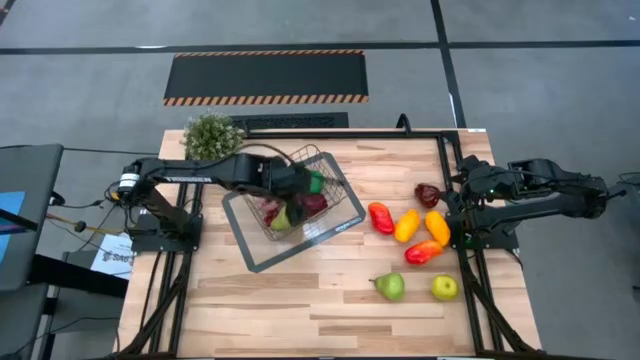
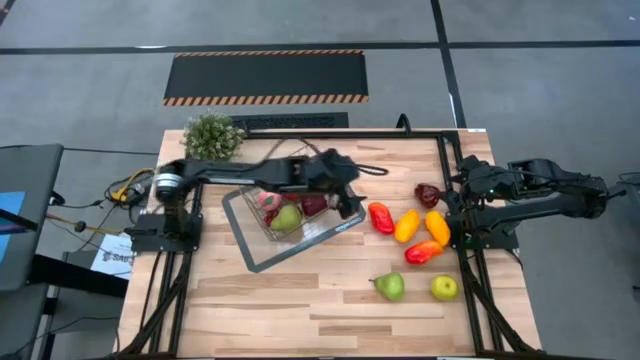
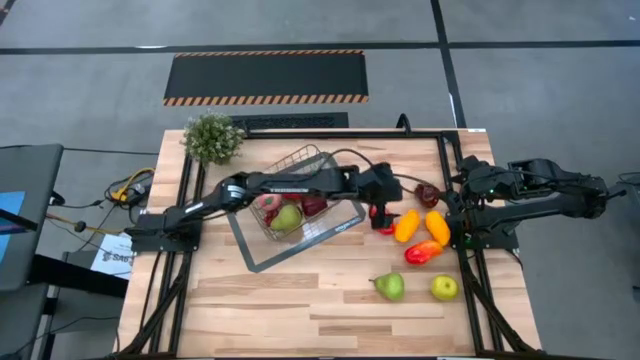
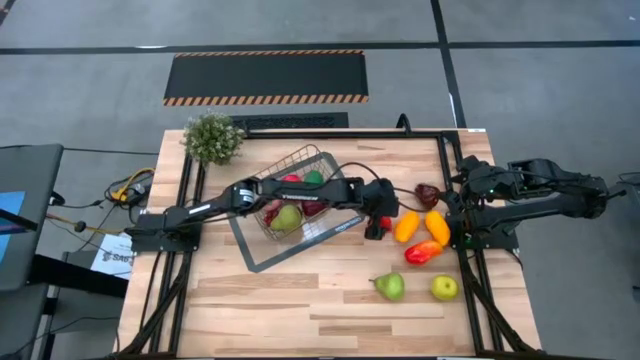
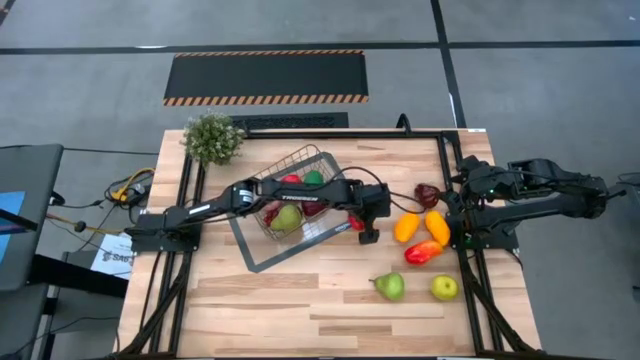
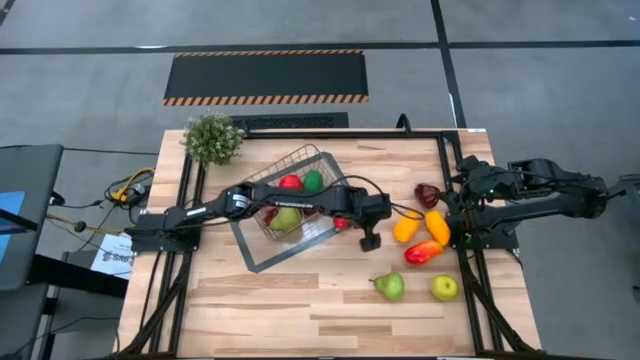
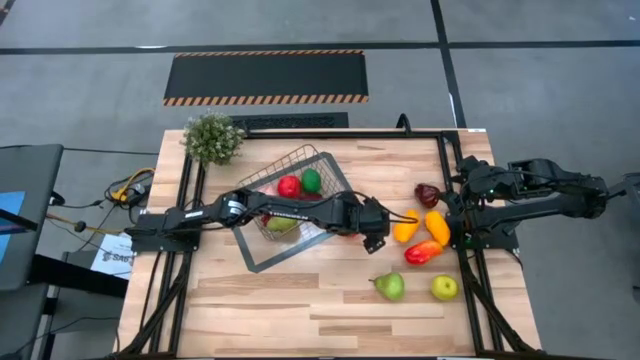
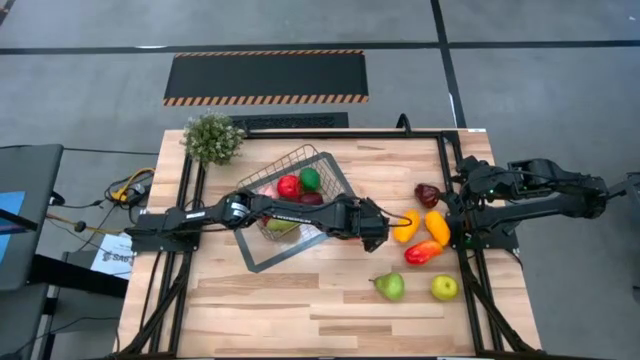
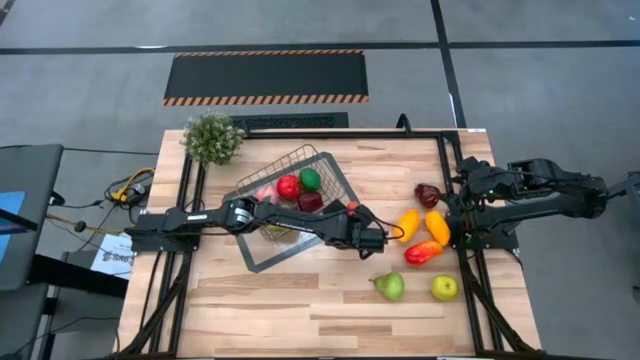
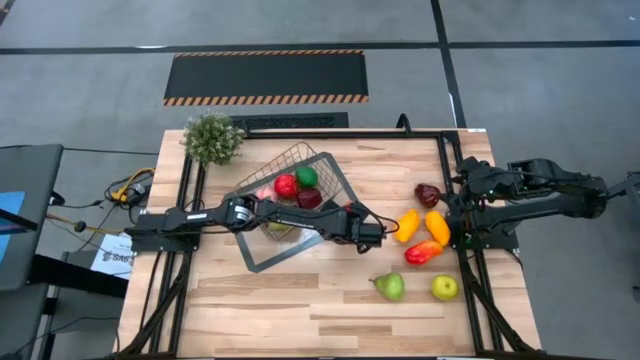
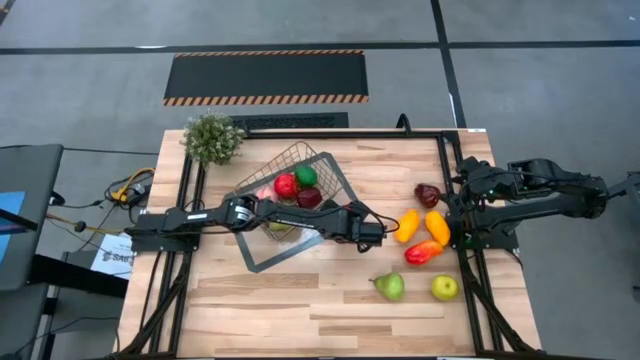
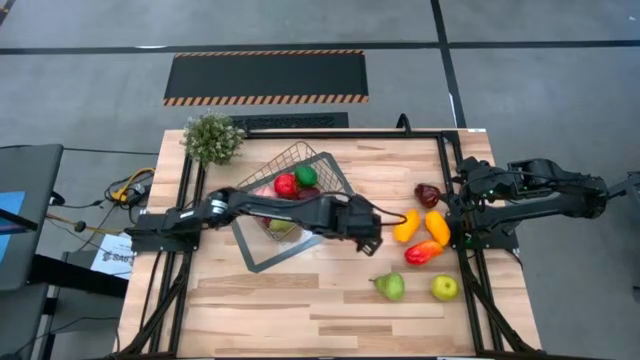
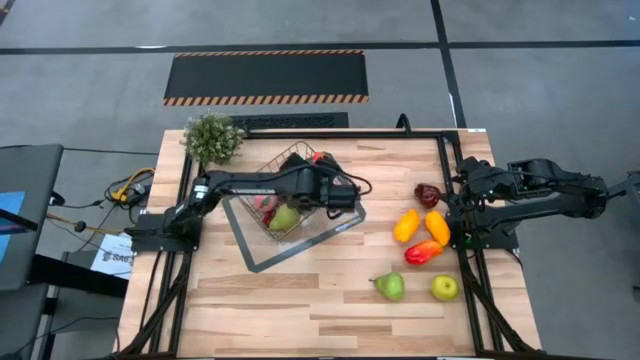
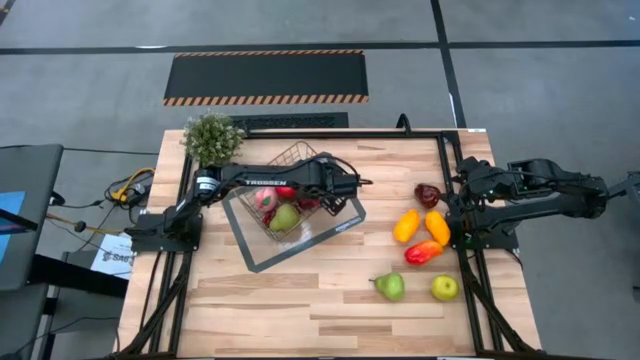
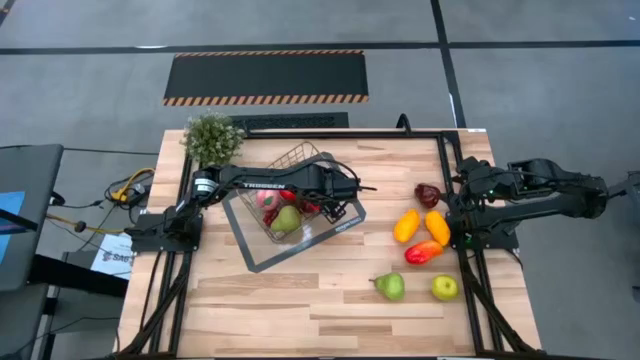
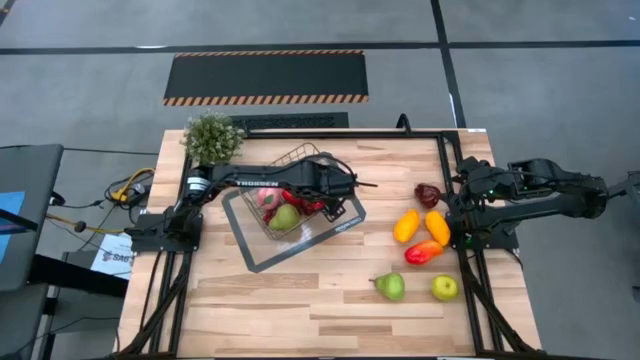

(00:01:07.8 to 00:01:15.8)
Task: Build produce basket
Put the red and yellow mango into the gold wire basket

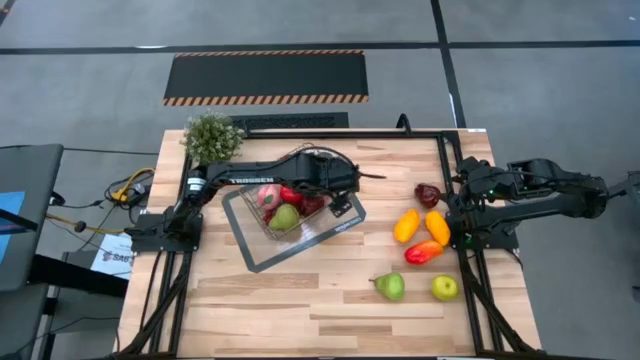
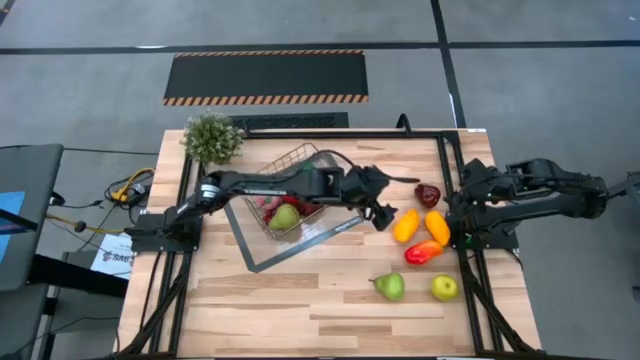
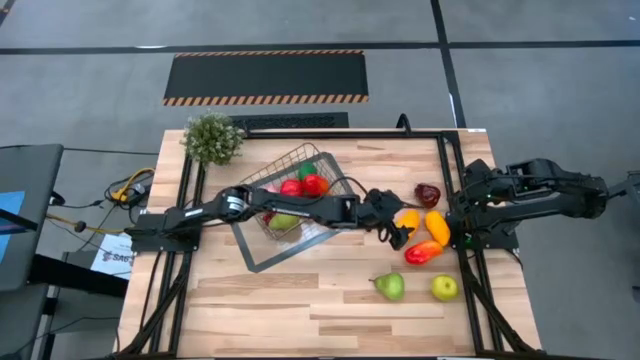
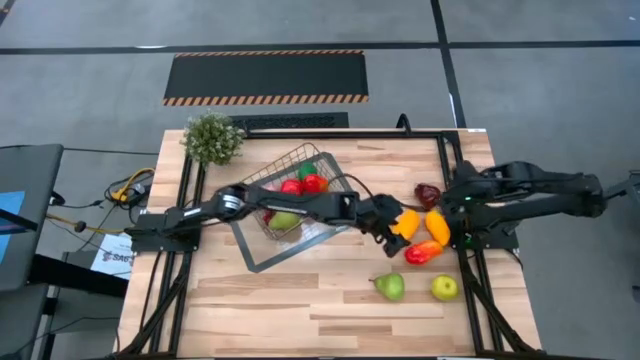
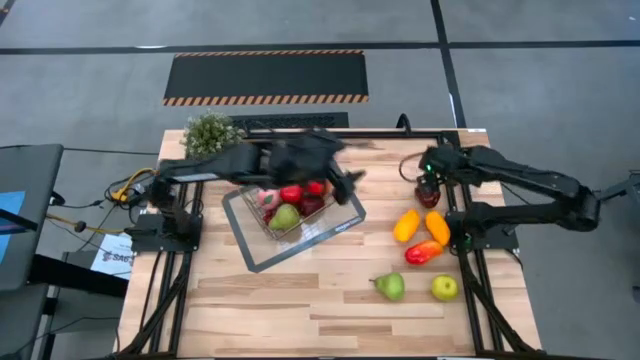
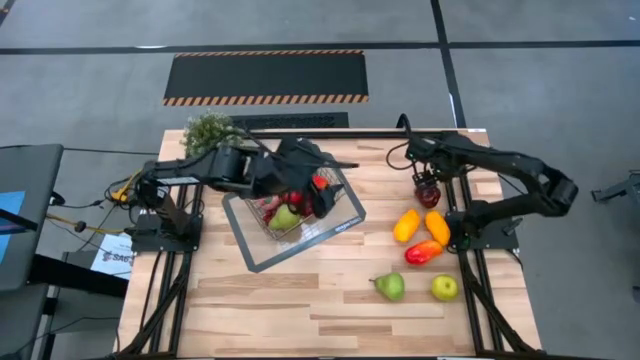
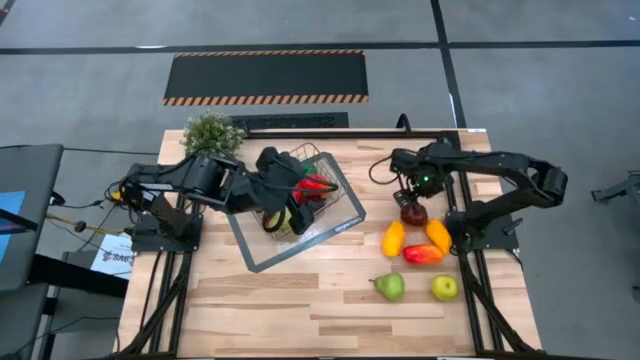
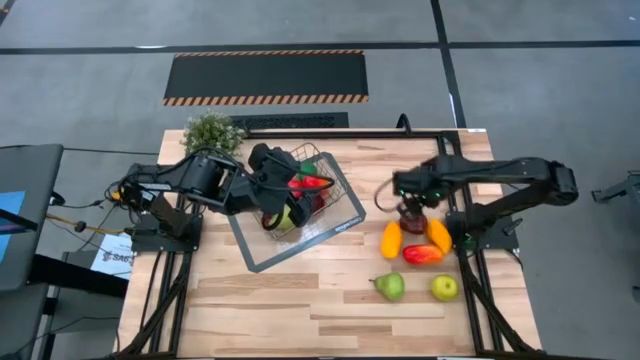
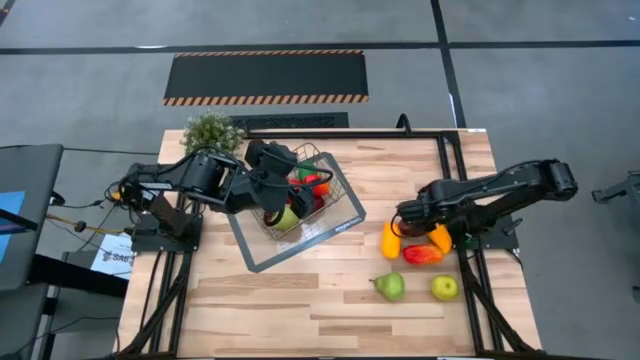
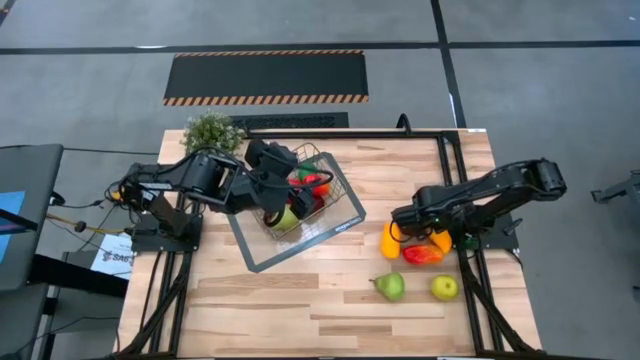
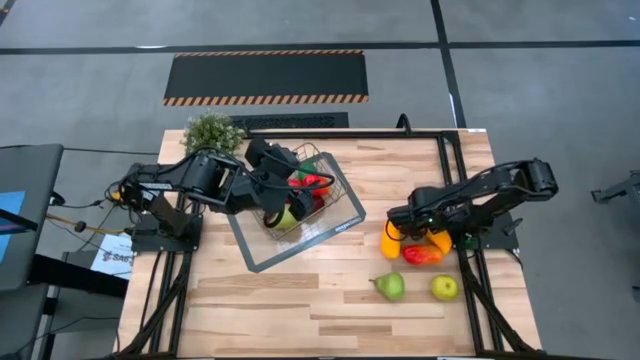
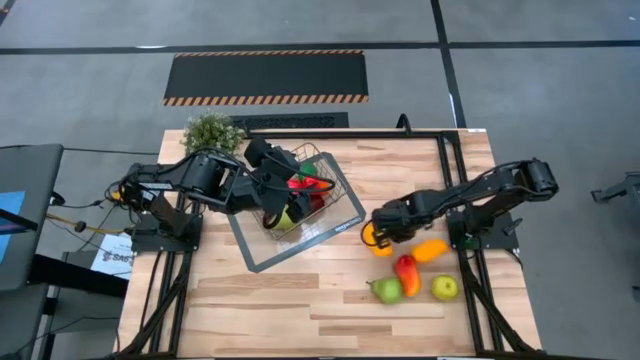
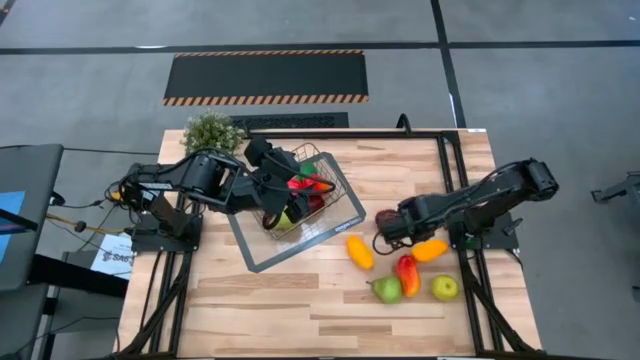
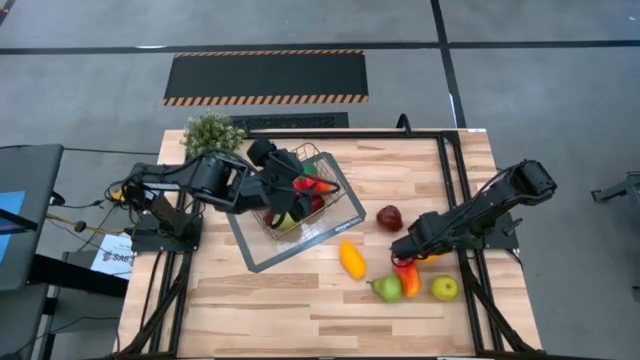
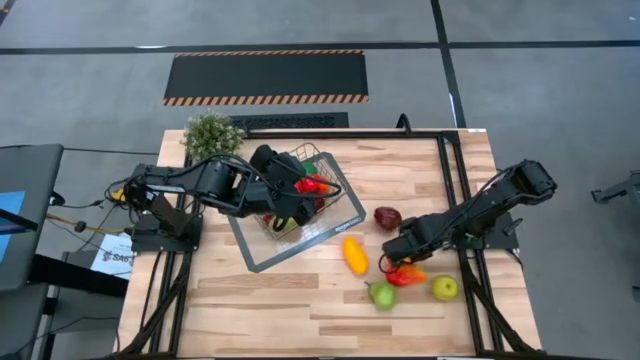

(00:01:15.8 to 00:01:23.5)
Adjust the fruits on the table

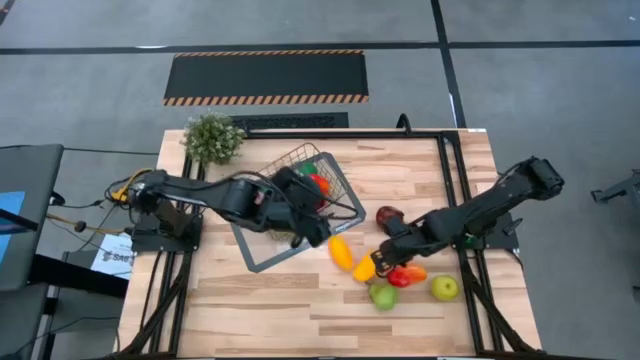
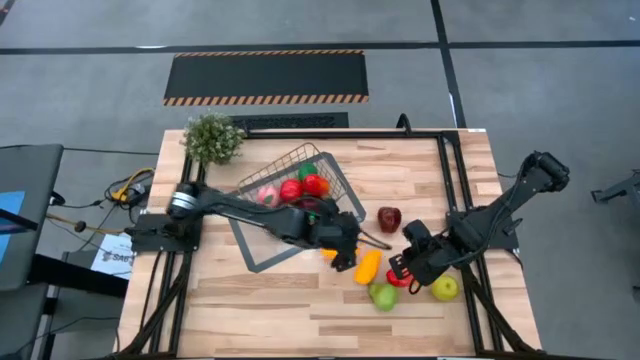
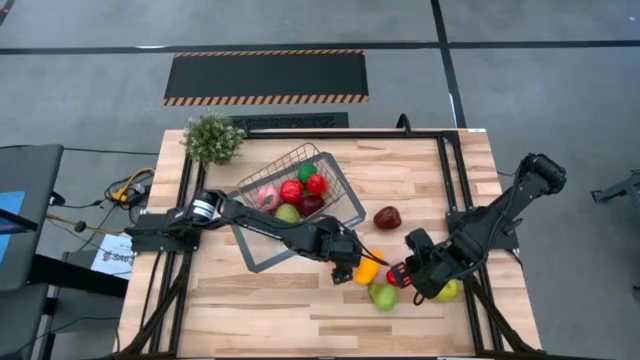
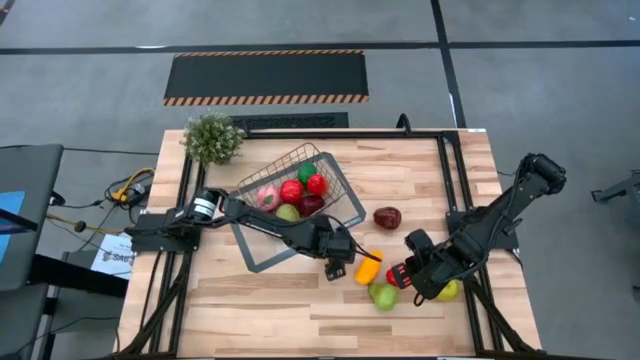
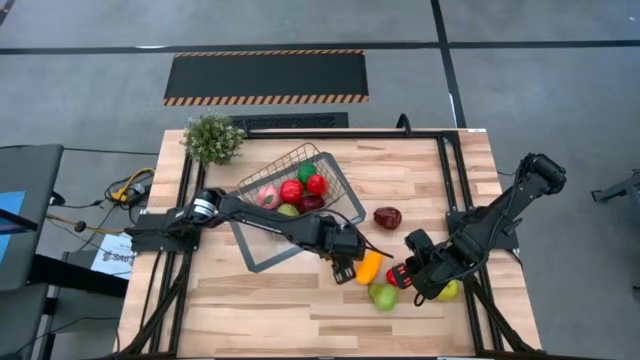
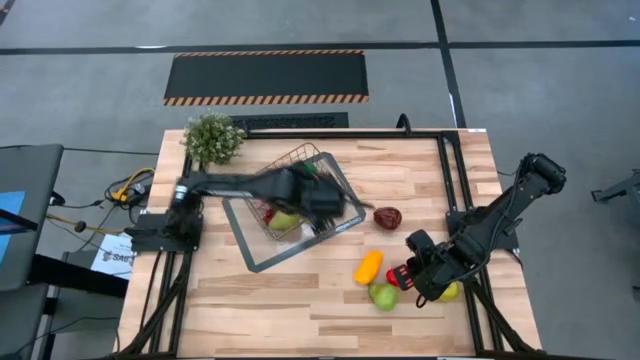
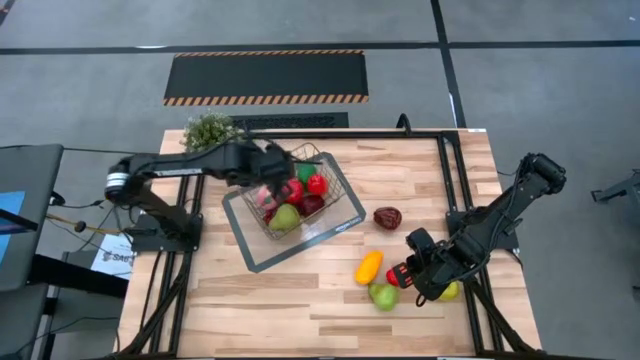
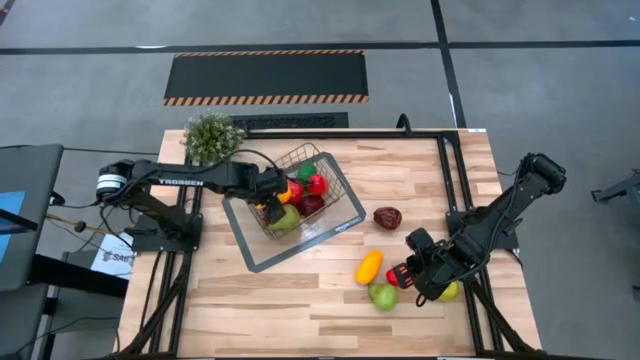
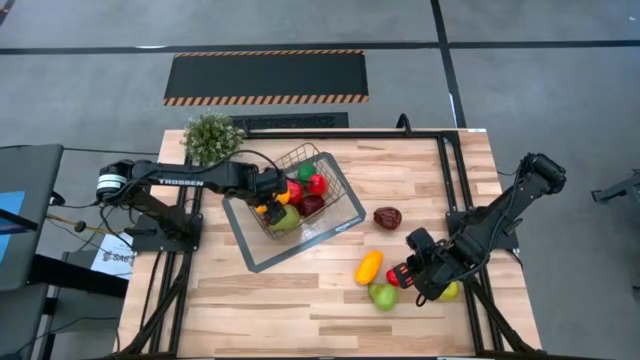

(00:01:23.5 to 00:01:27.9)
Put the yellow mango into the gold wire basket

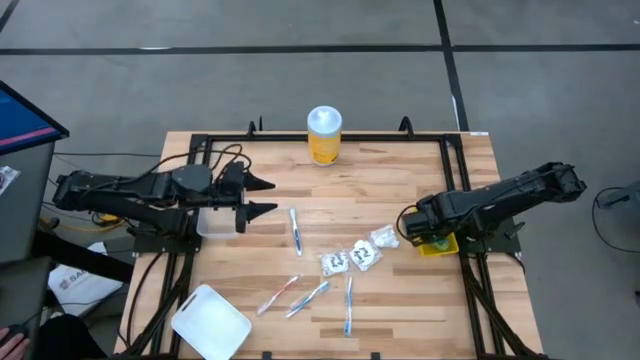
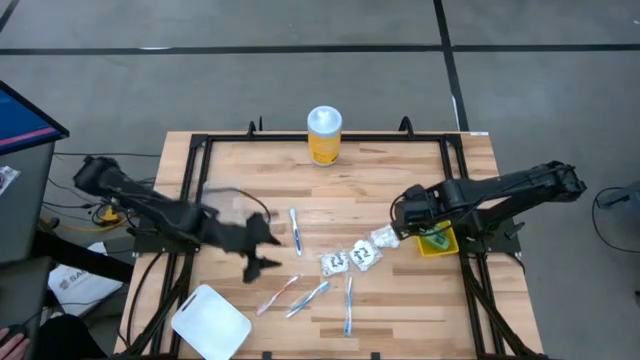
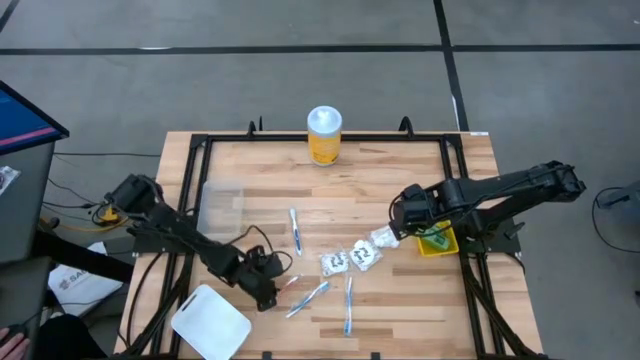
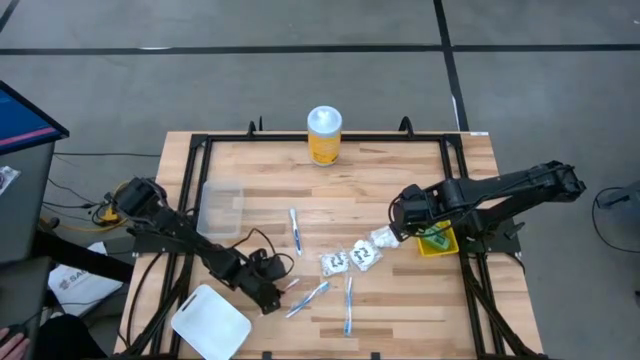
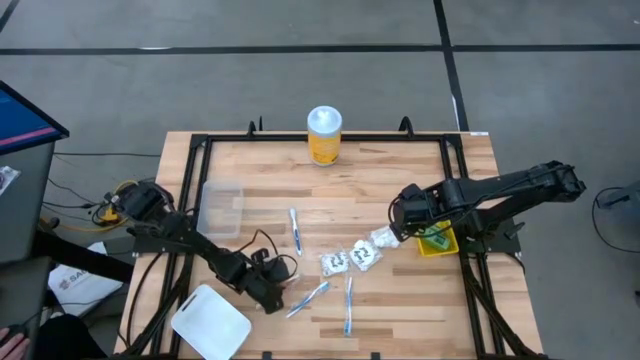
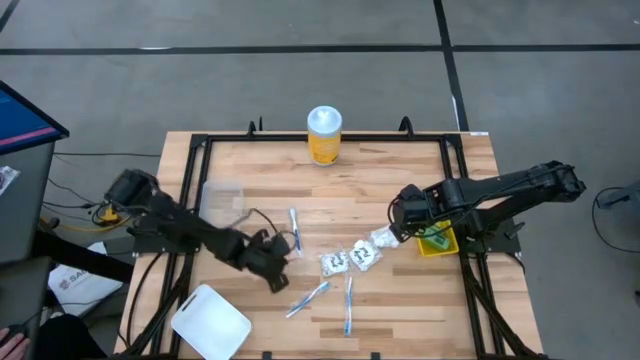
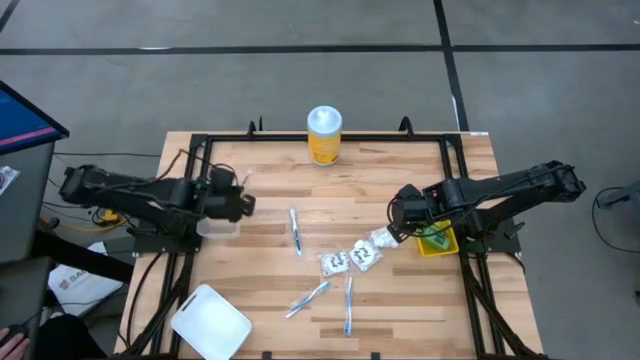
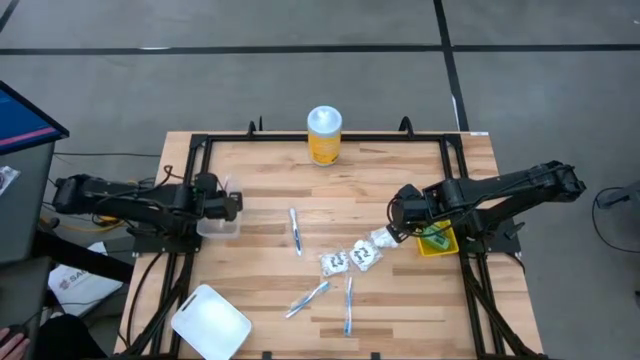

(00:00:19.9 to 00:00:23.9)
Task: Pick & Place Travel size toiletries
Put the red toothbrush into the transparent bin
